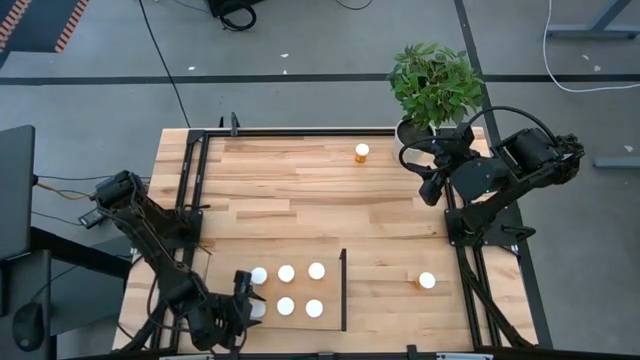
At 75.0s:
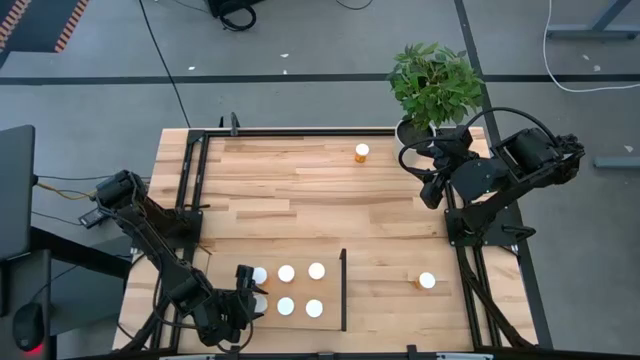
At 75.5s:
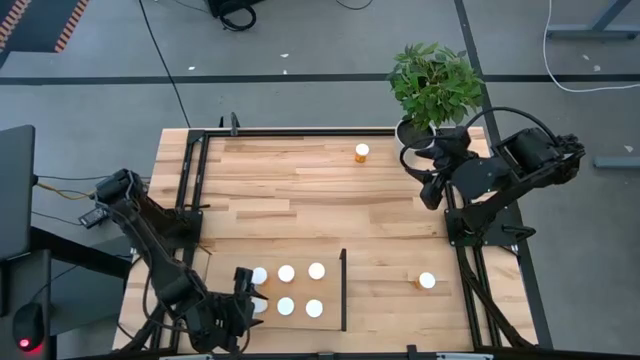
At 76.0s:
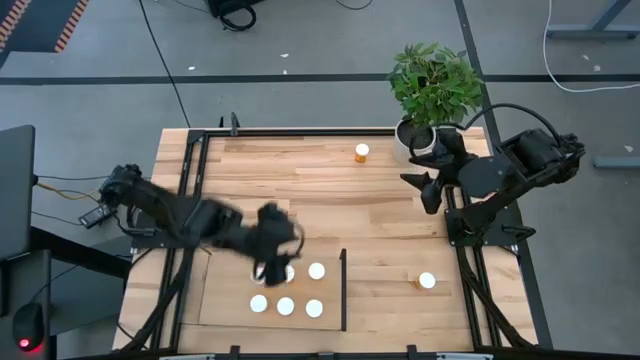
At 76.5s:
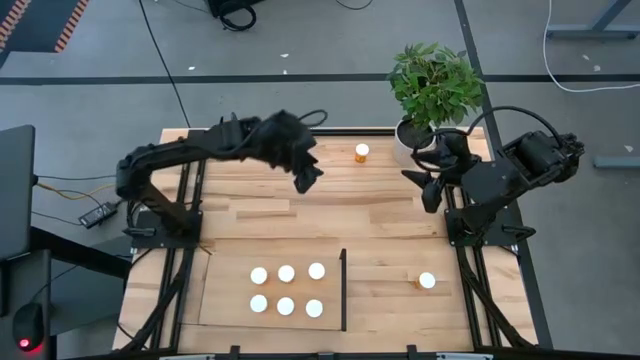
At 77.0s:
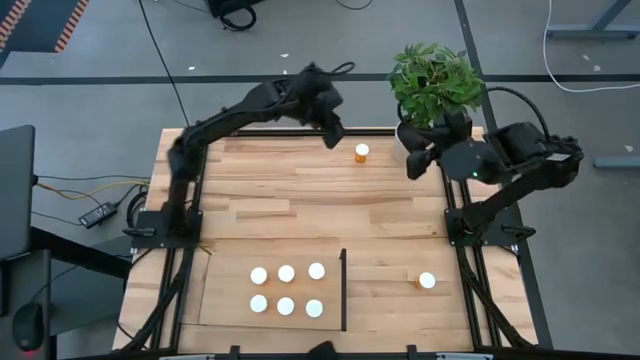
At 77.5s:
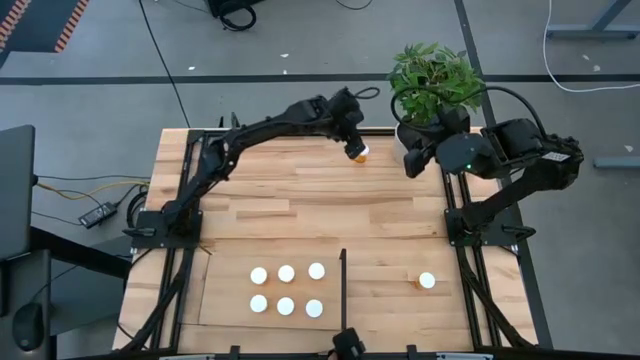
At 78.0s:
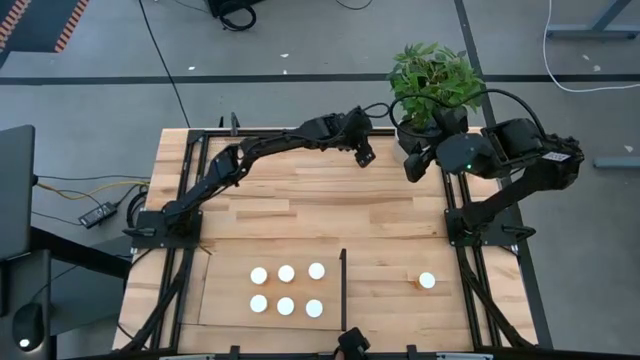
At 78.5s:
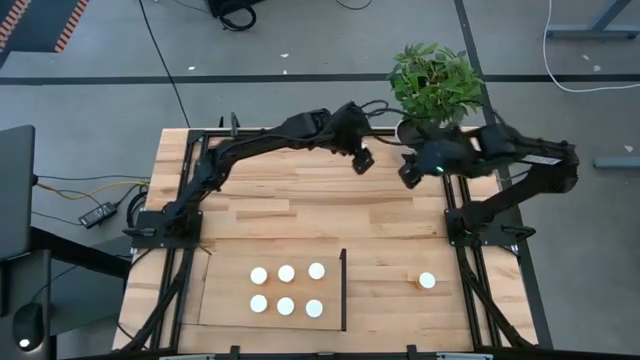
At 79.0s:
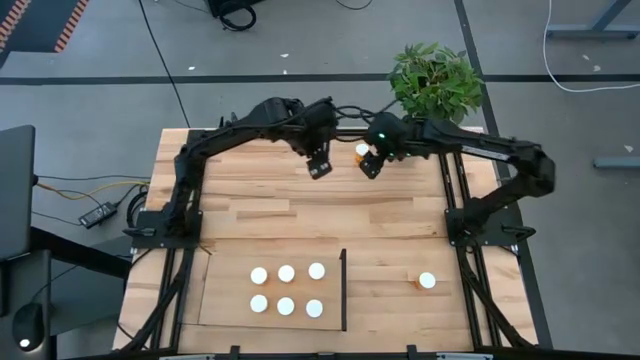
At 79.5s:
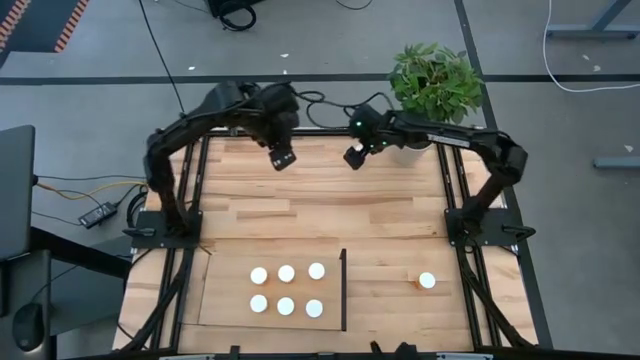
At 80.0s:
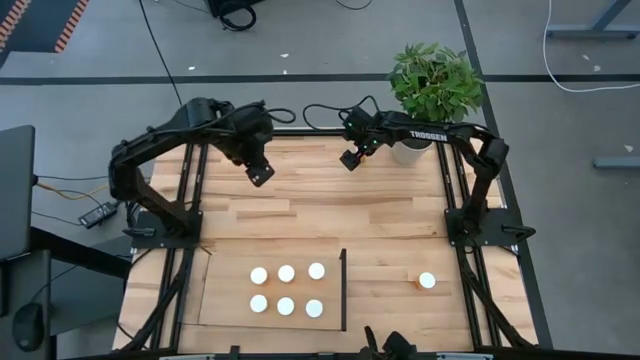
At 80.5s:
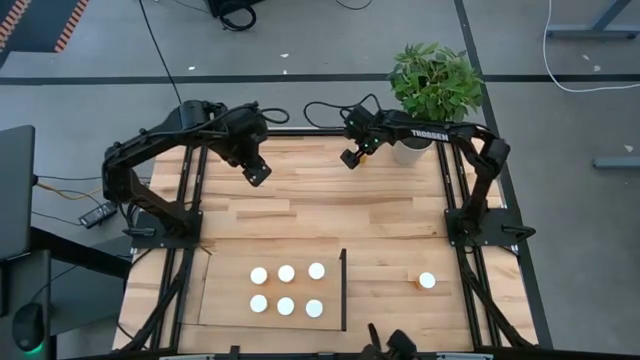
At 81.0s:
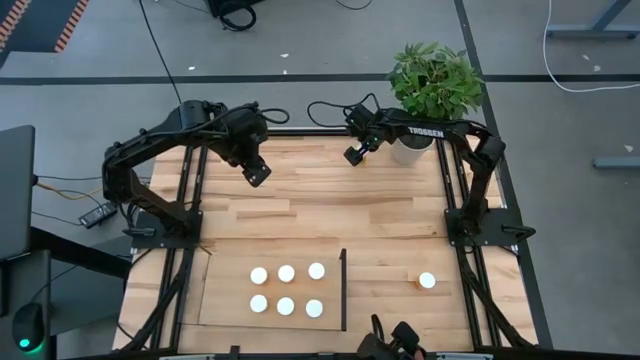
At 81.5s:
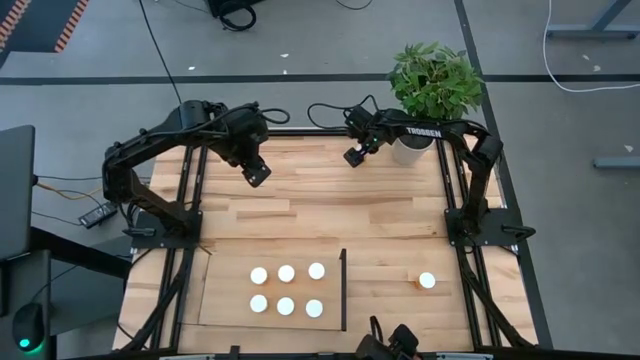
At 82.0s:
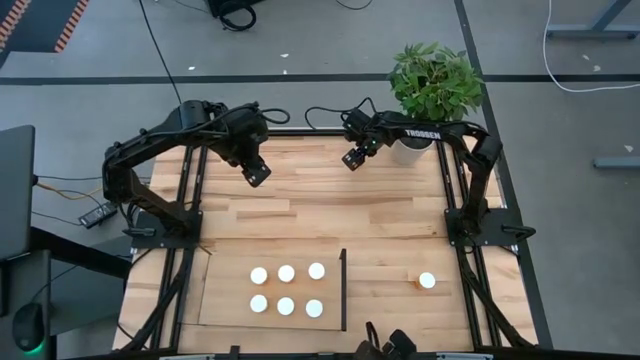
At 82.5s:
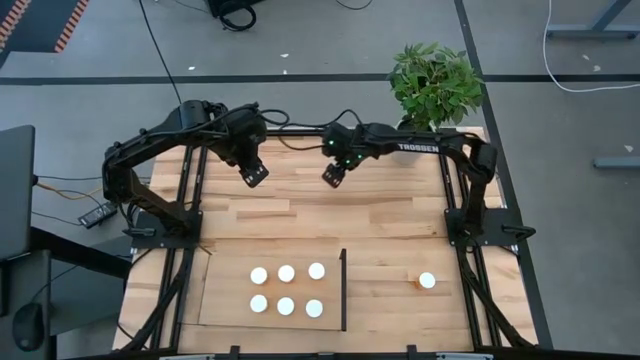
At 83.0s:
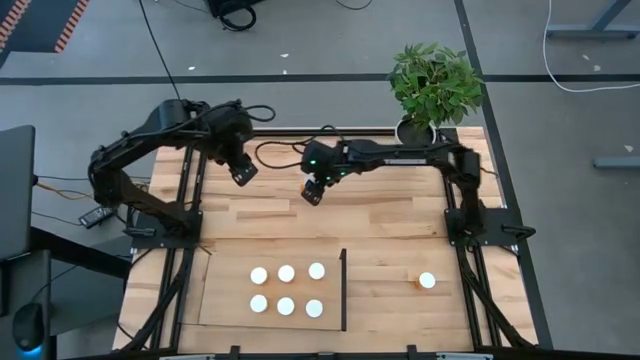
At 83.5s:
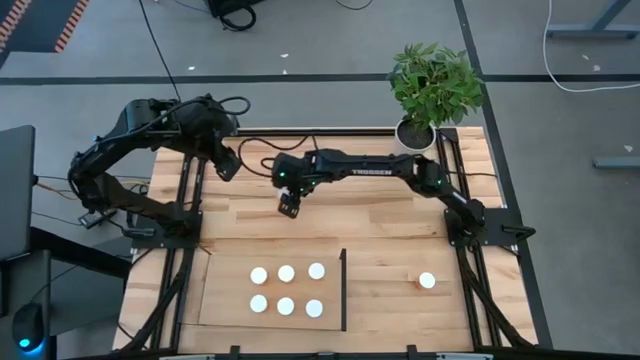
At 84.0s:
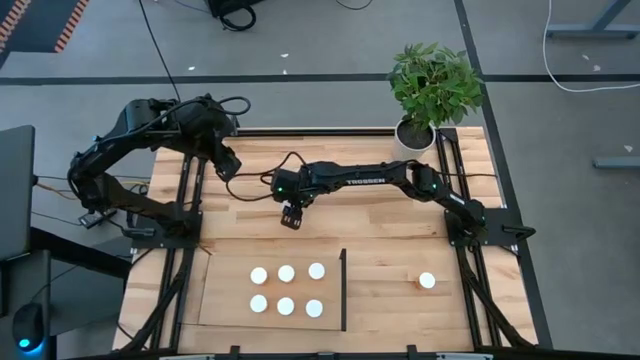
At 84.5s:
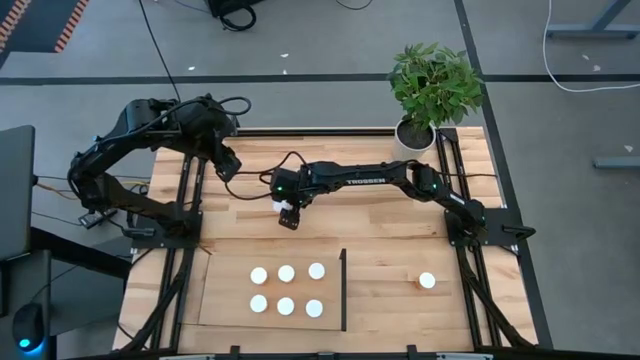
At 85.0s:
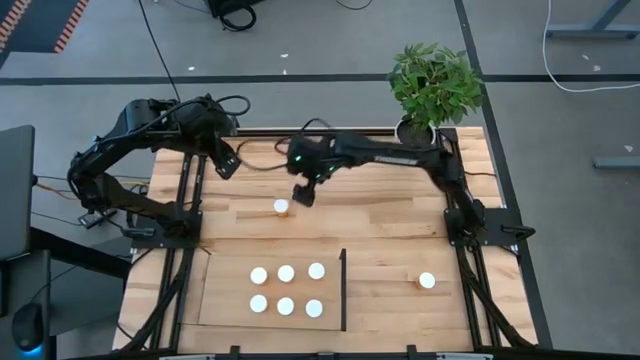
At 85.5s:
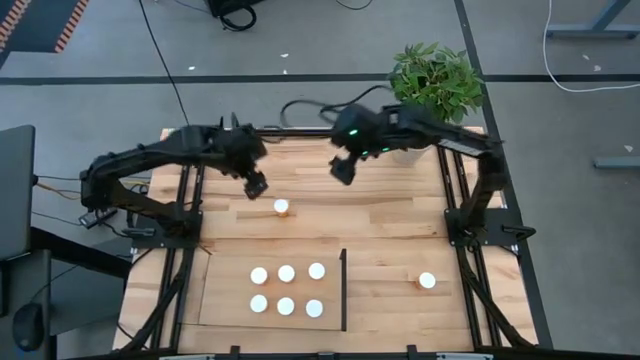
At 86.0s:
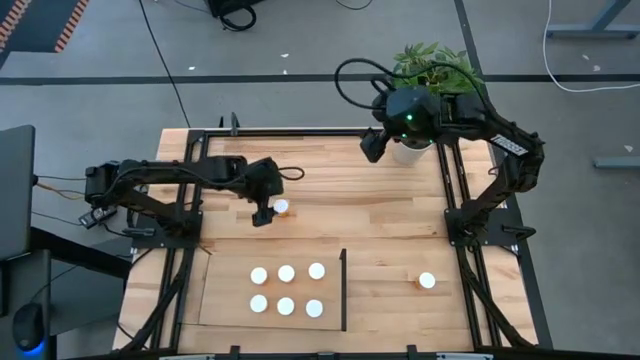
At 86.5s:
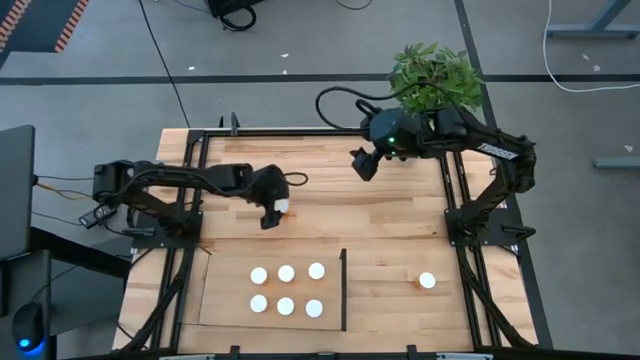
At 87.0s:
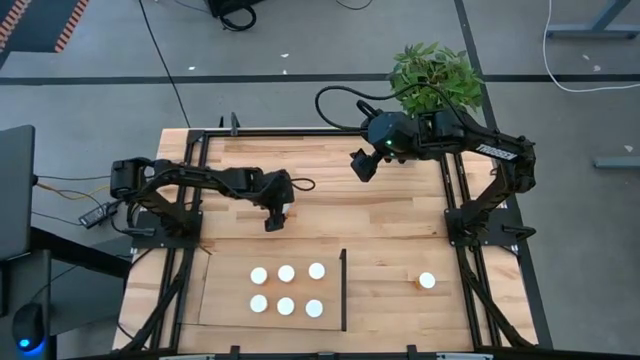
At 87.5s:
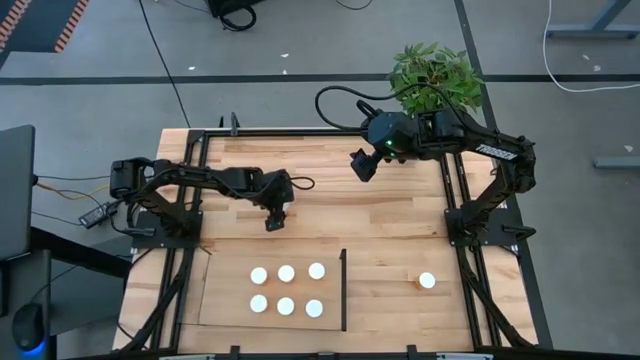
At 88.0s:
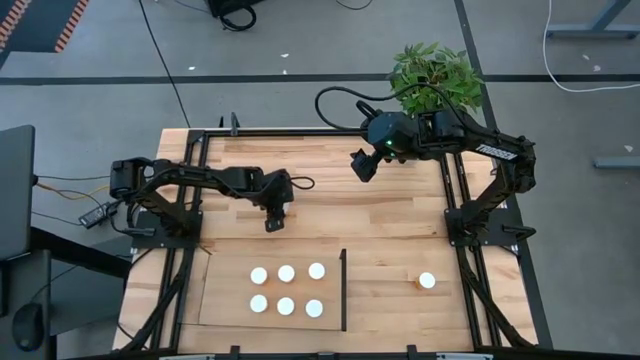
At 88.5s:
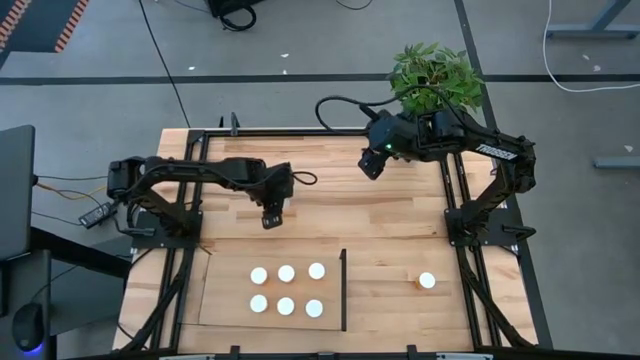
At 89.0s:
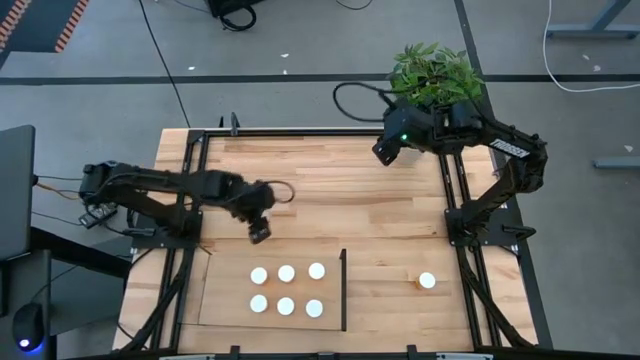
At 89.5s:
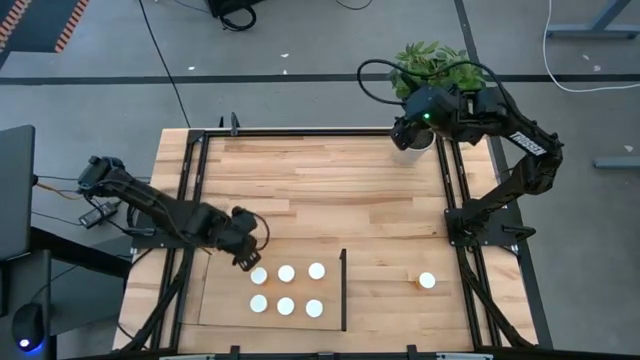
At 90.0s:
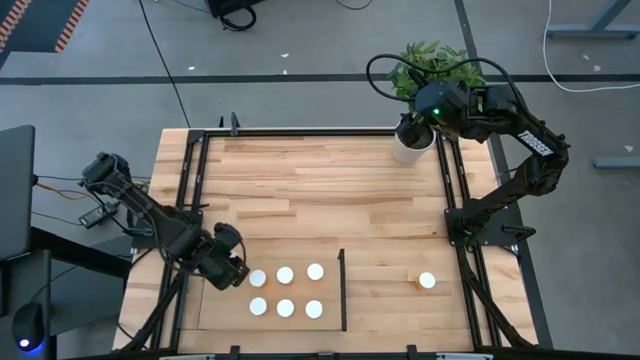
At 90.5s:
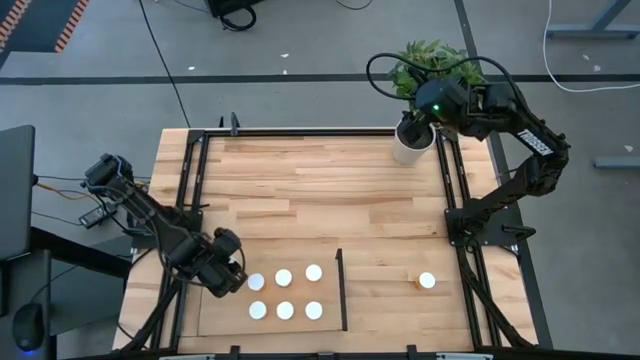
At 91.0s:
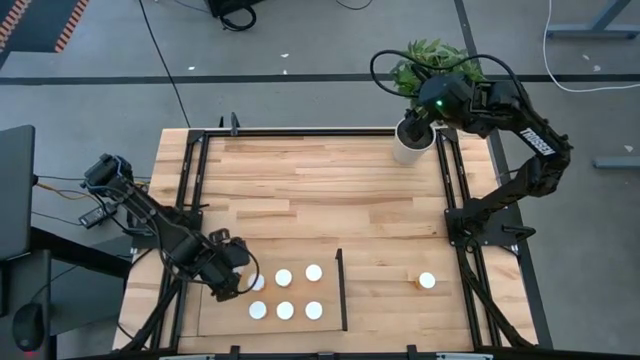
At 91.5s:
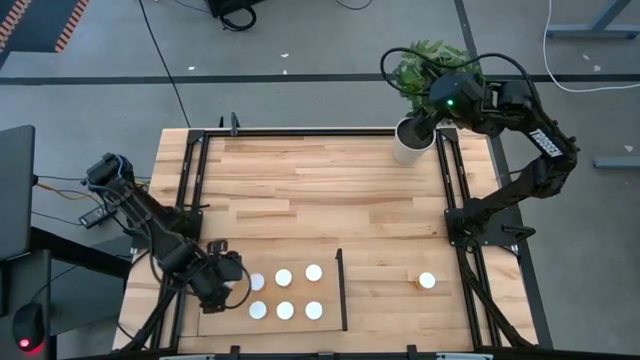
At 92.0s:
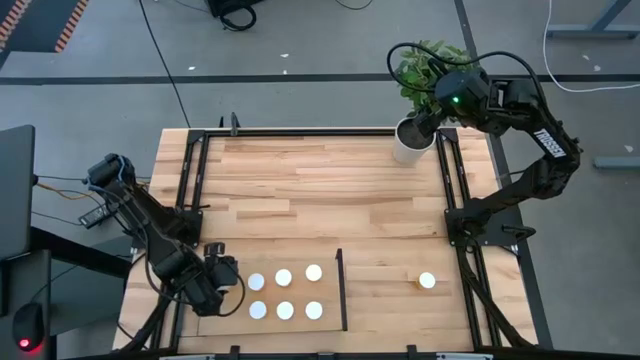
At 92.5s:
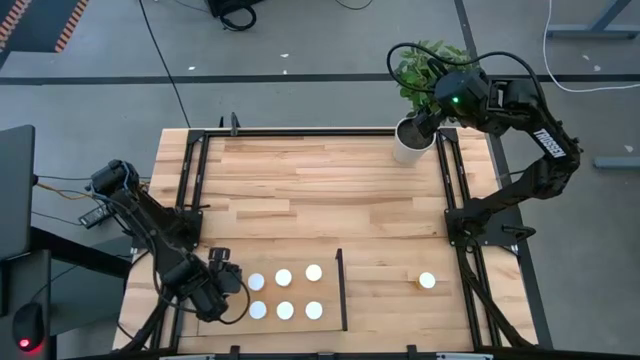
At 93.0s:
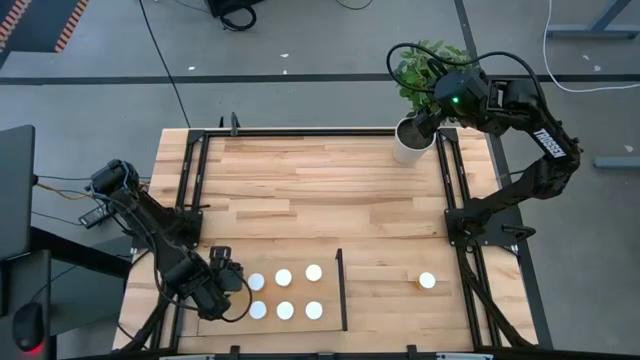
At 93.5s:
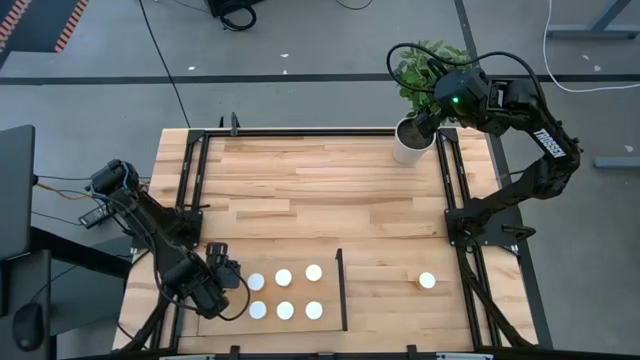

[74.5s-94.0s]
Task: Pick and place medicine bottles onto shelf by color
Put the orange pill bottle on the shelf

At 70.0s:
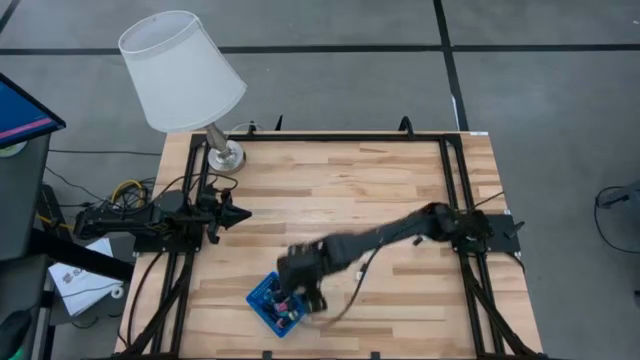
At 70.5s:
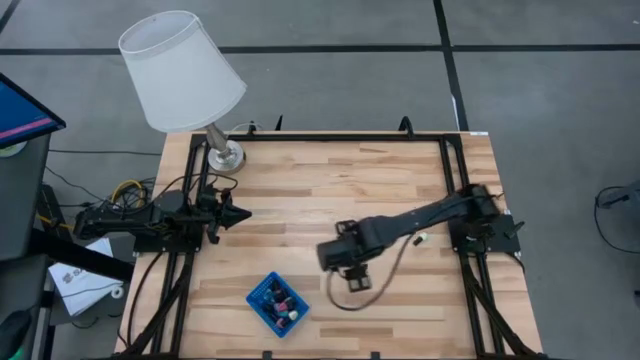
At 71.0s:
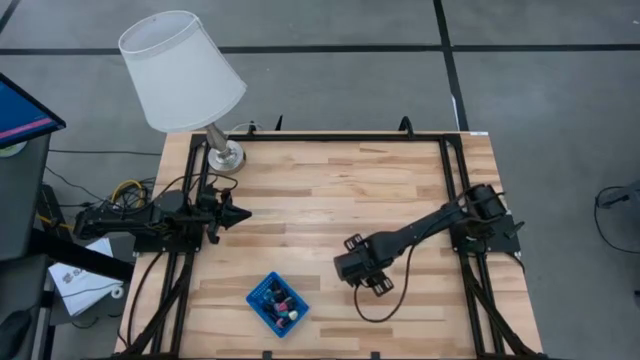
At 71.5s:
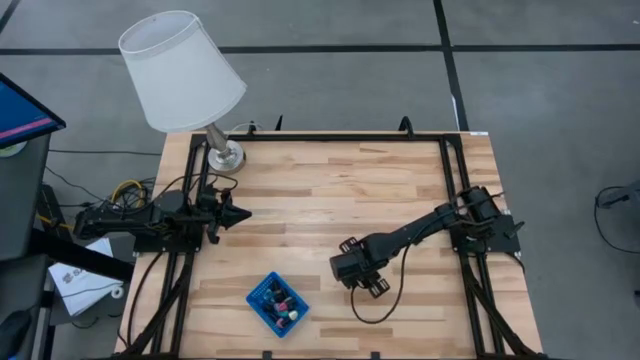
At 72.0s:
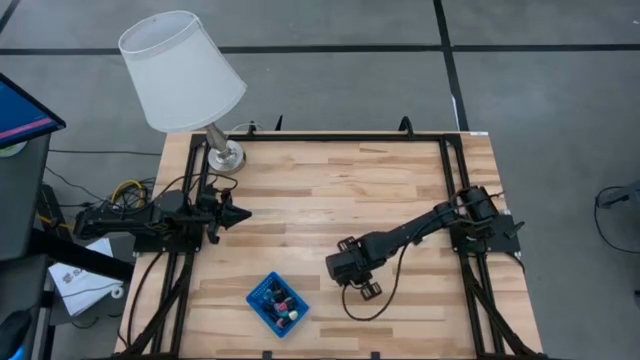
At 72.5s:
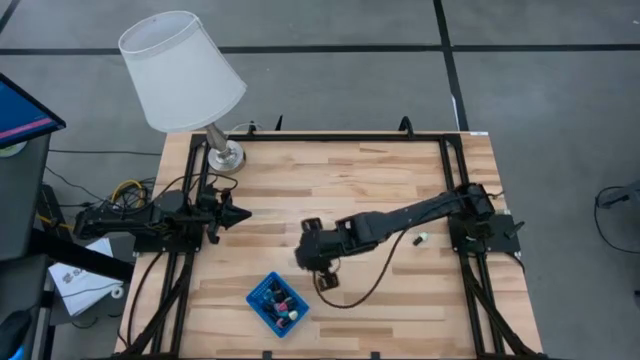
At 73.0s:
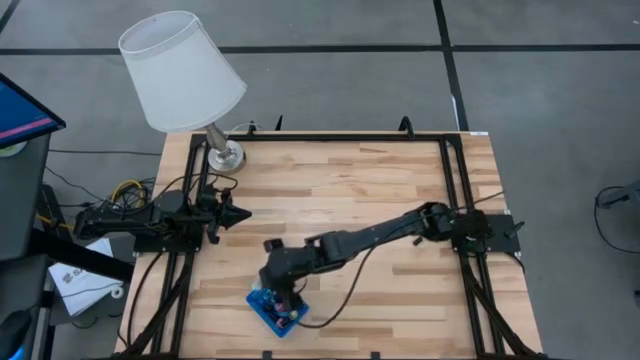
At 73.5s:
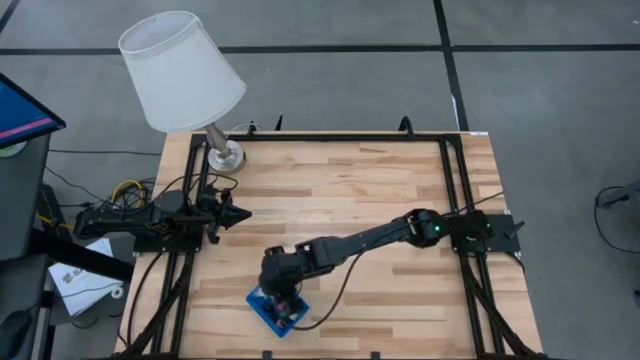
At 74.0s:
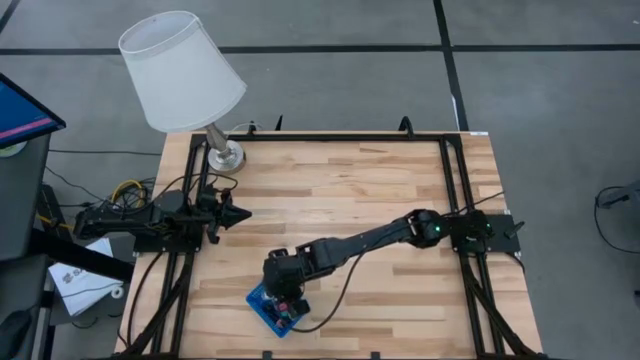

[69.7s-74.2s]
Task: Pick & Place Nail Polish
Put the left white nail polish bottle in the blue bin
